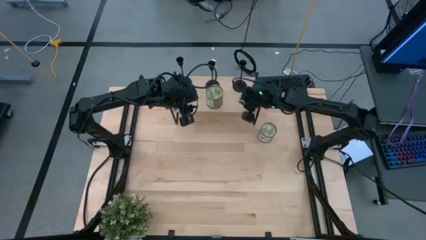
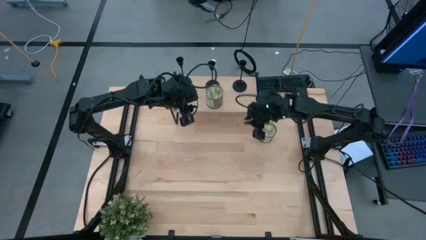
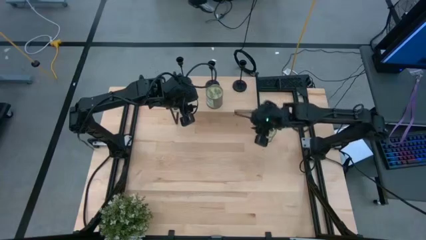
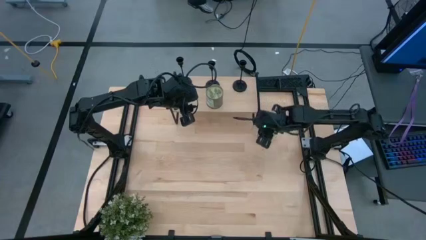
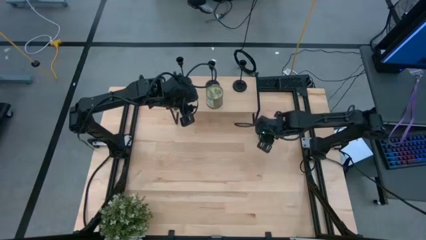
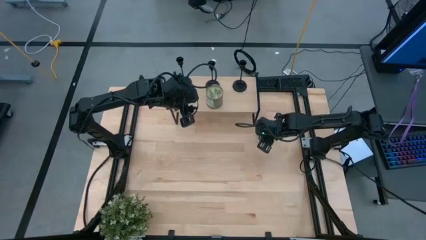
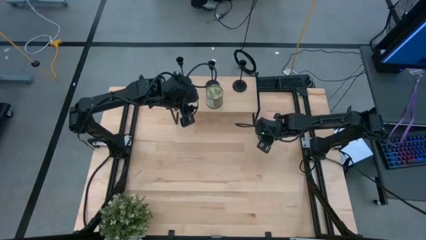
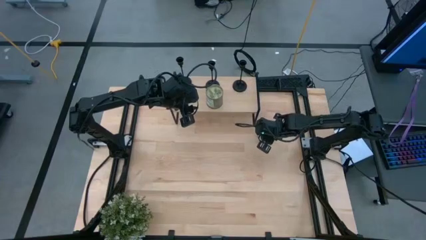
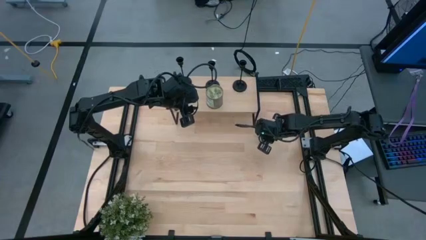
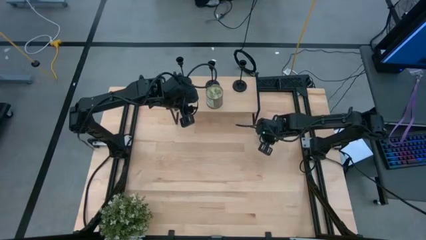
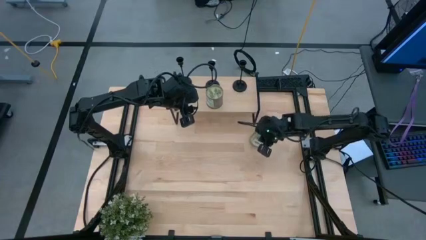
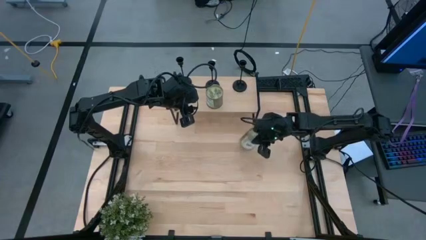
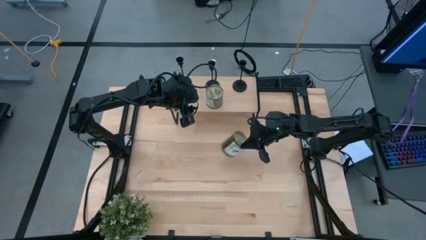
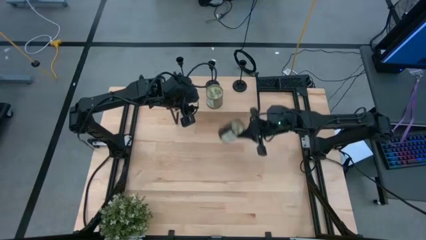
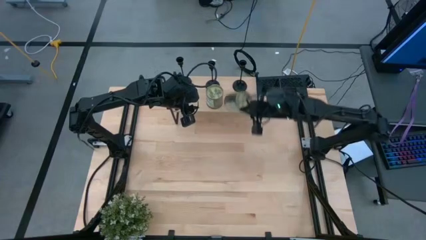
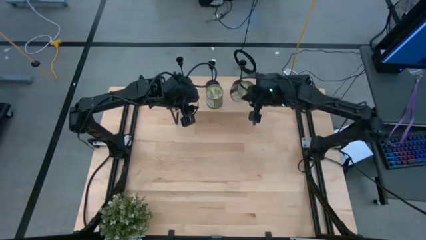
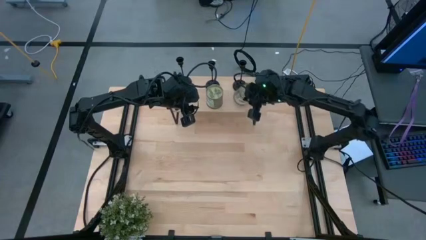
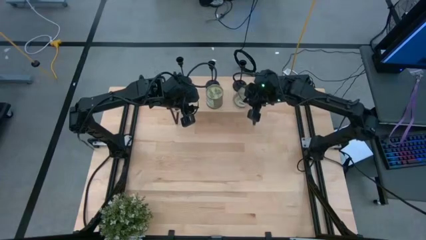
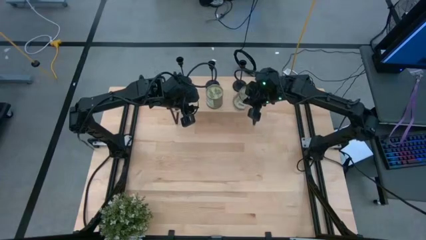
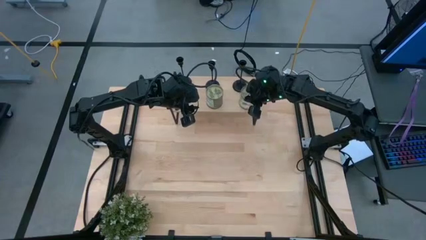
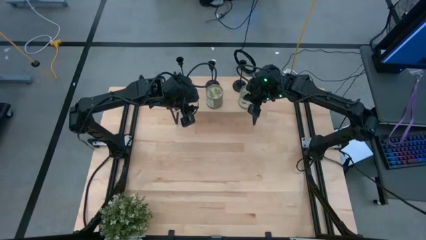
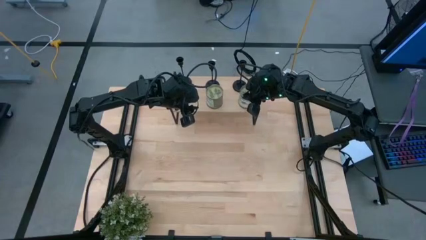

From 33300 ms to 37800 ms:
Task: Pick & Place candle stick holders
Put the green scented candle on the shelf

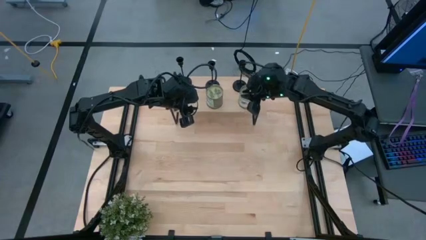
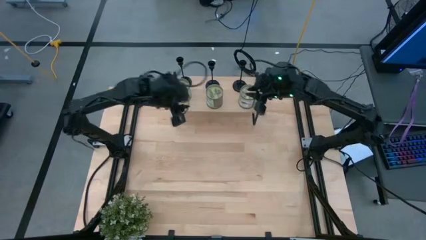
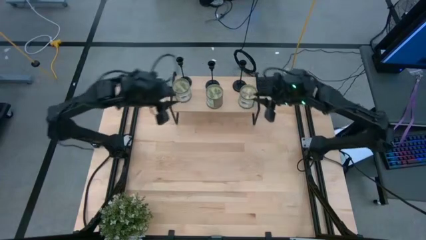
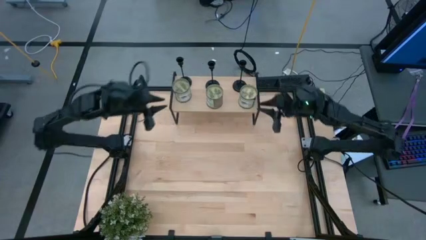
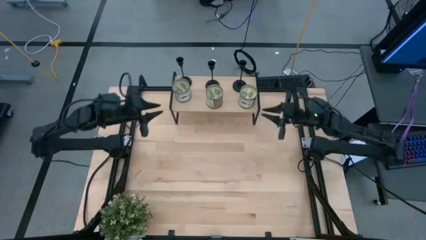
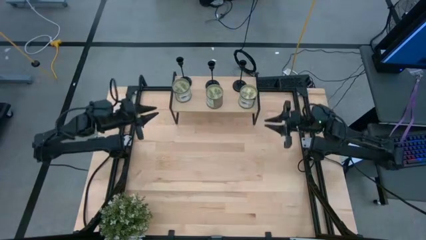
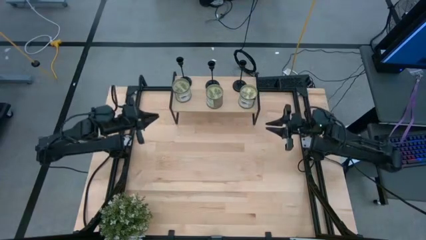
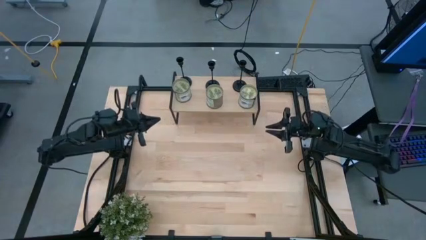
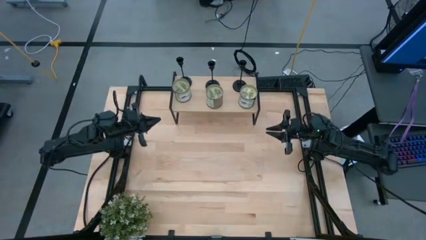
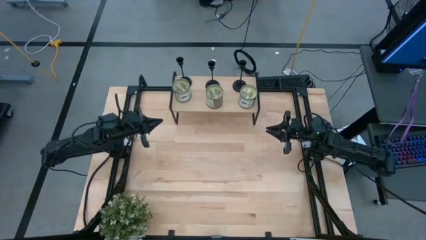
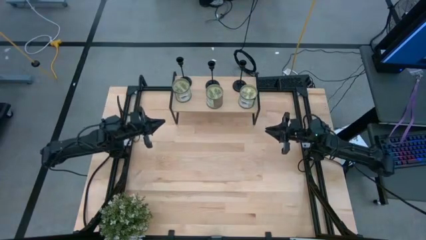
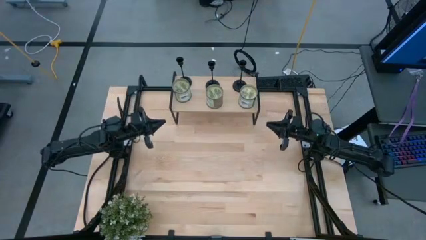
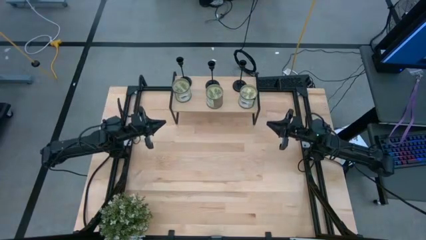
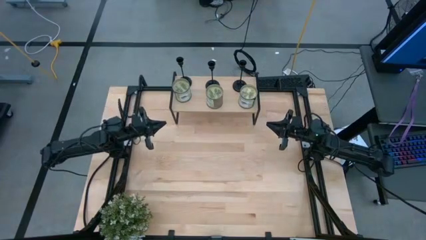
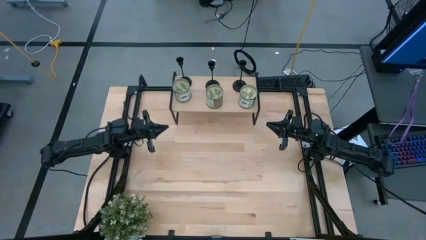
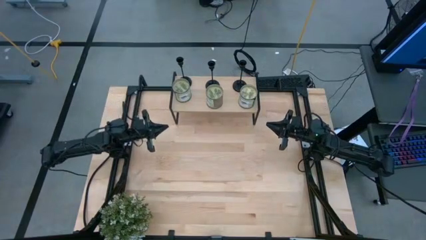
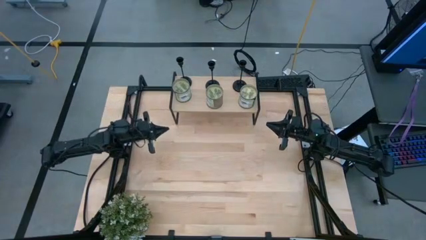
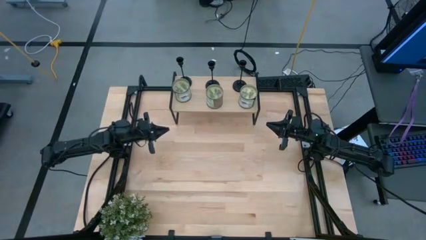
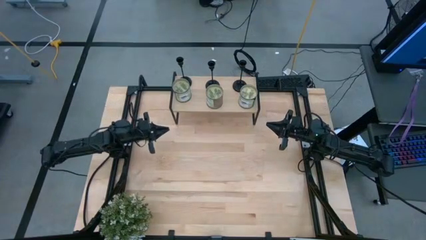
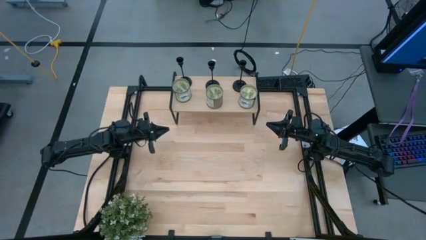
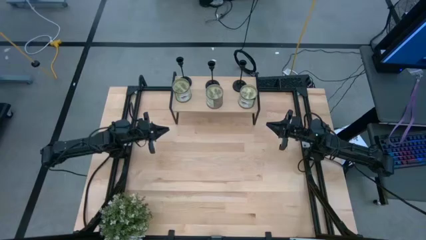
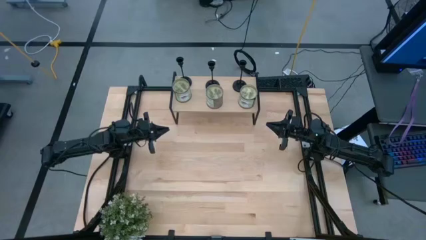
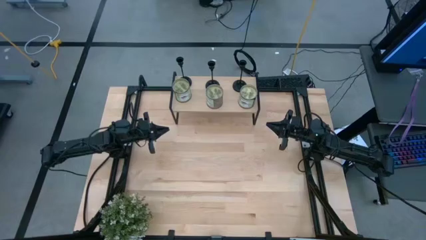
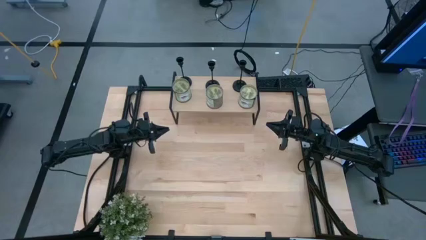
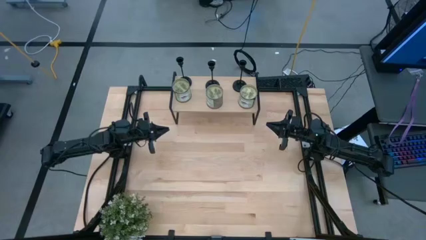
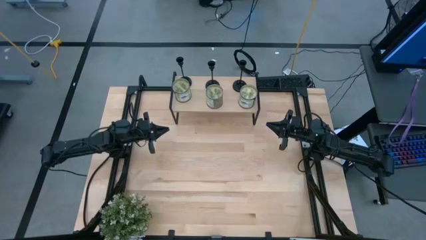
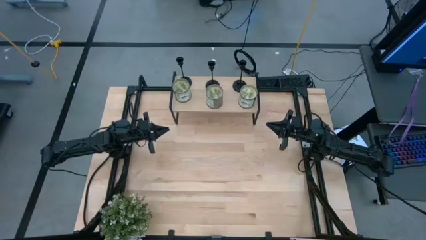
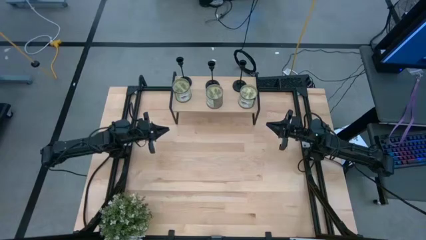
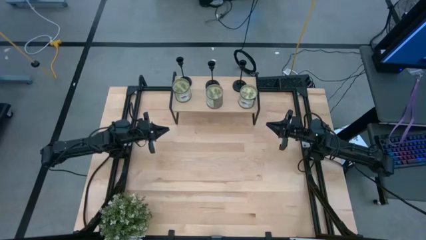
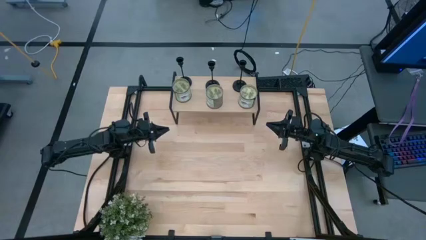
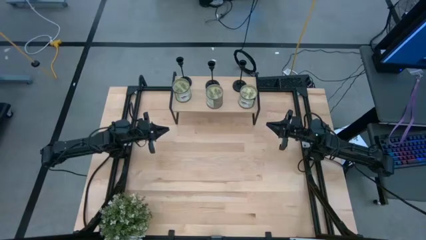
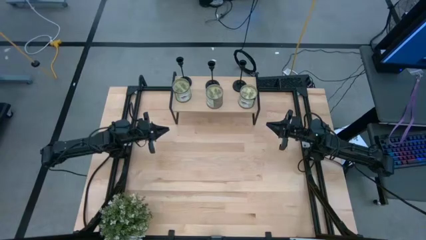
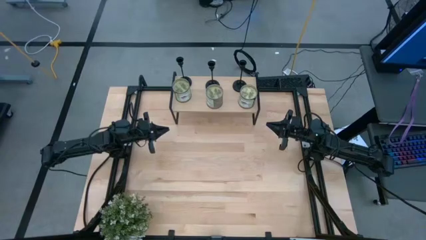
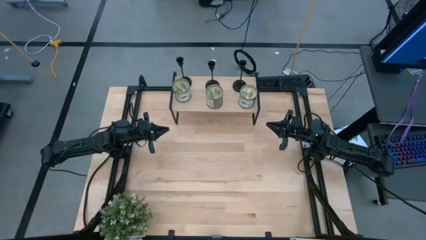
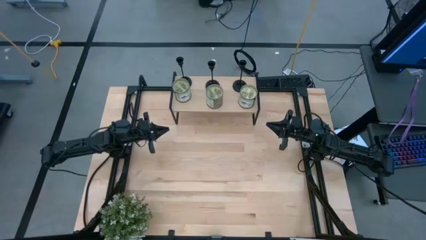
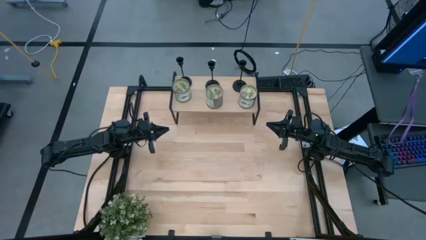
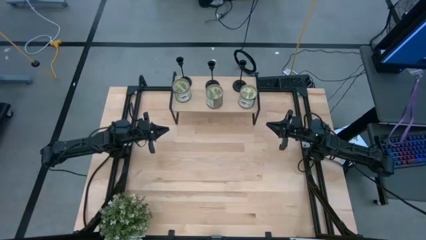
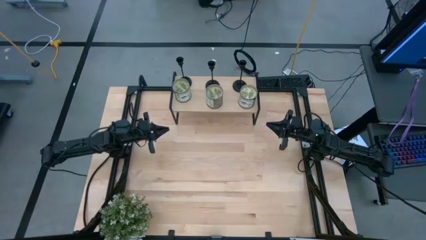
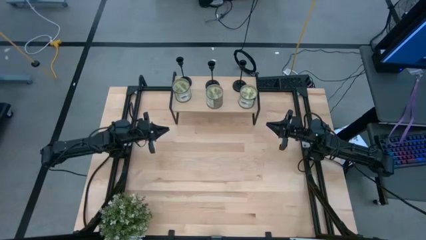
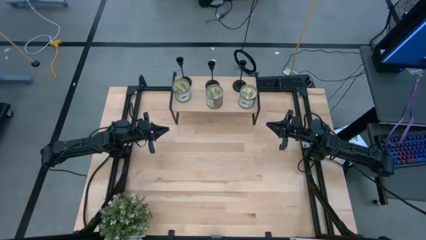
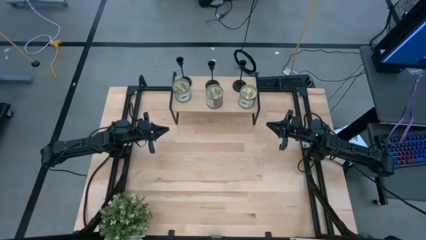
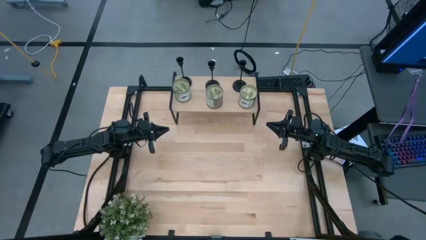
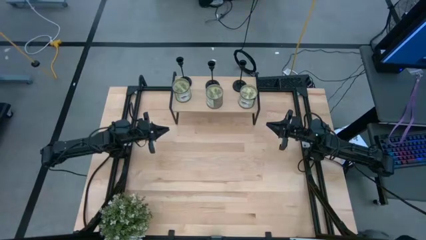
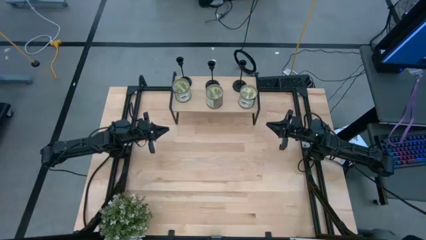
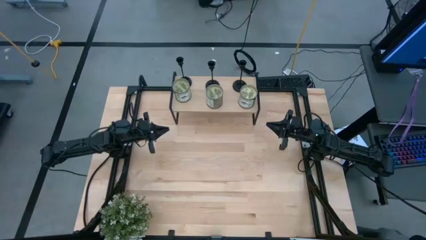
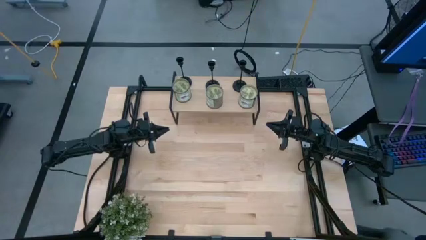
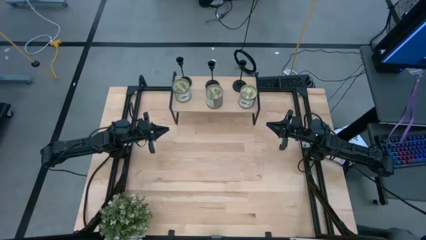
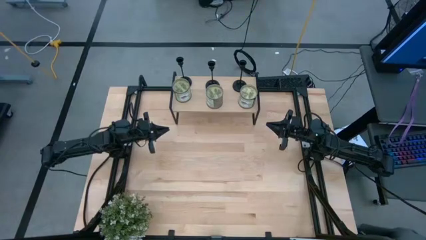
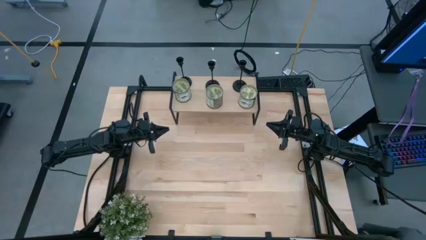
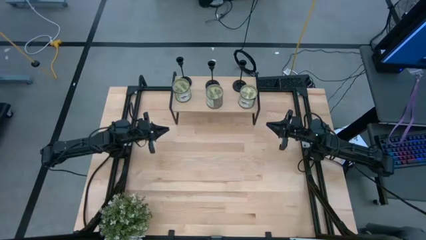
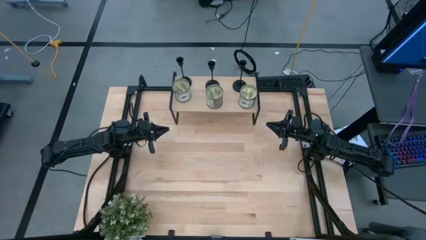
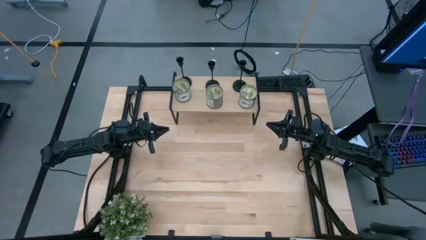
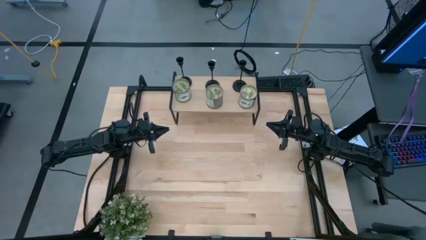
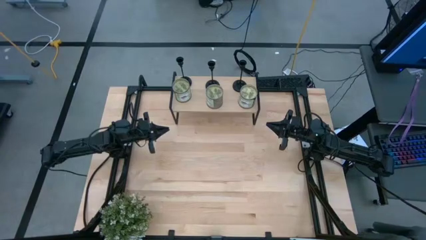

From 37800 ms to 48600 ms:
Return to Home Position
